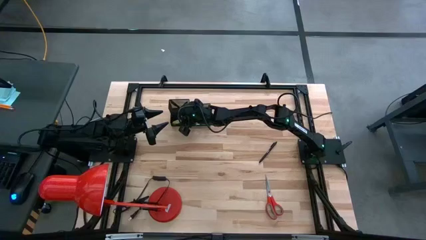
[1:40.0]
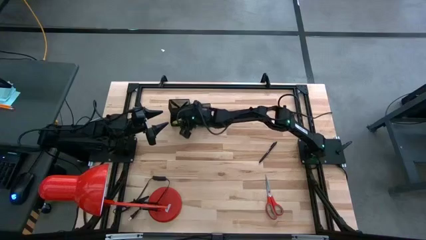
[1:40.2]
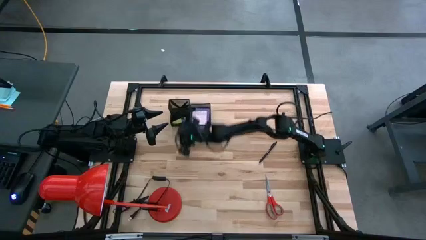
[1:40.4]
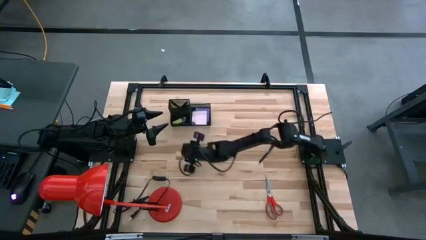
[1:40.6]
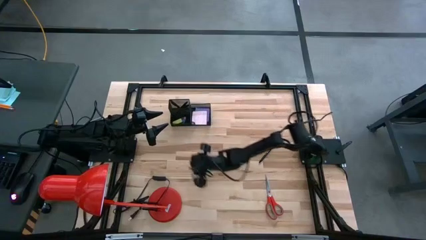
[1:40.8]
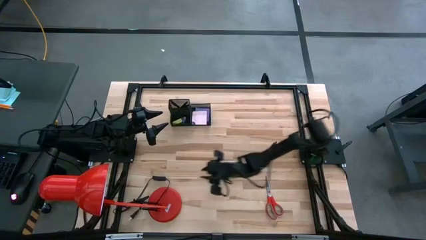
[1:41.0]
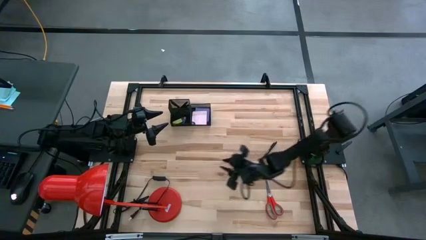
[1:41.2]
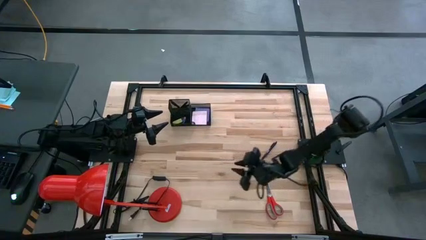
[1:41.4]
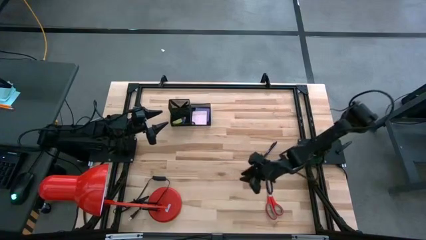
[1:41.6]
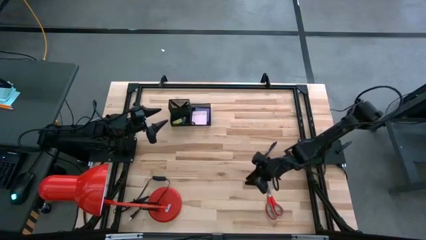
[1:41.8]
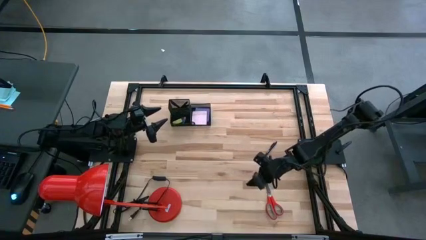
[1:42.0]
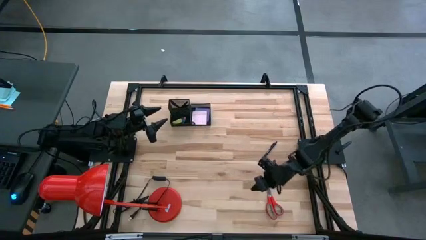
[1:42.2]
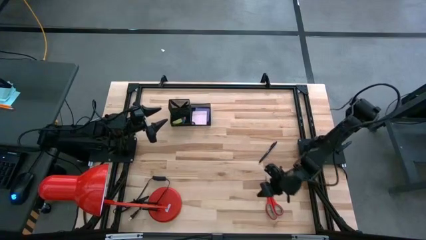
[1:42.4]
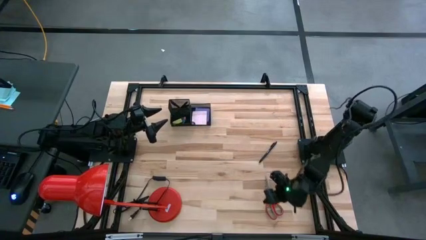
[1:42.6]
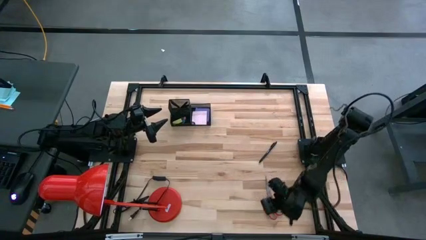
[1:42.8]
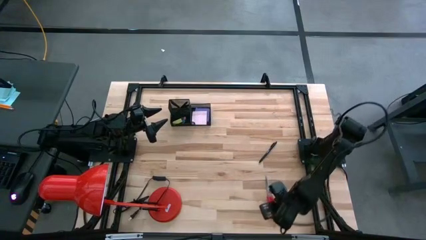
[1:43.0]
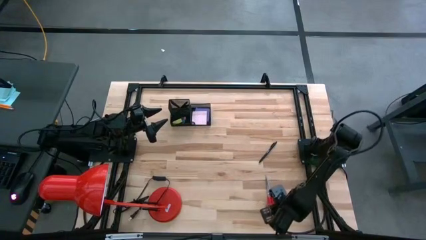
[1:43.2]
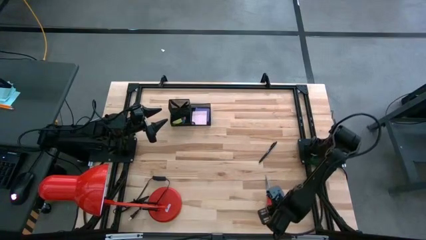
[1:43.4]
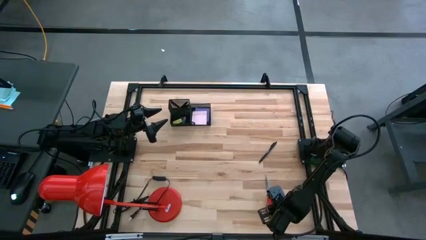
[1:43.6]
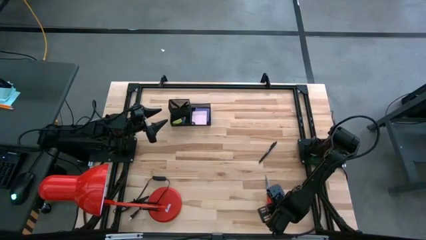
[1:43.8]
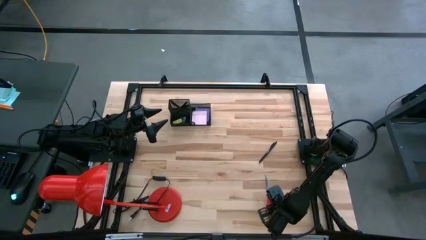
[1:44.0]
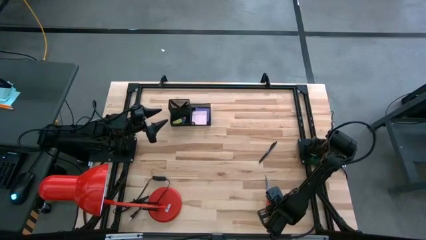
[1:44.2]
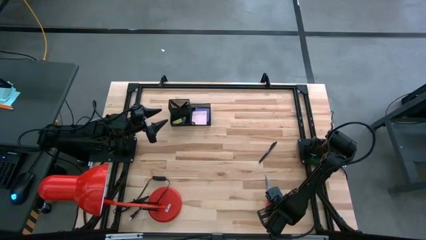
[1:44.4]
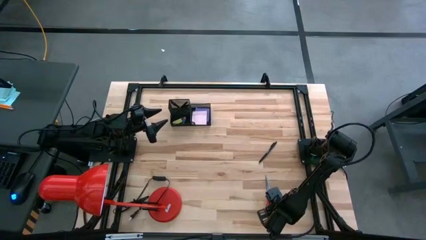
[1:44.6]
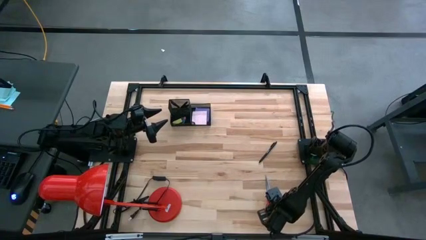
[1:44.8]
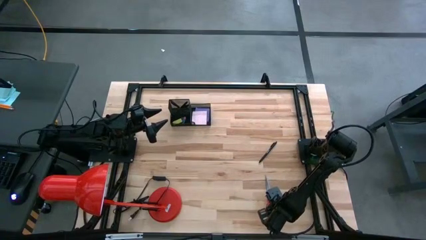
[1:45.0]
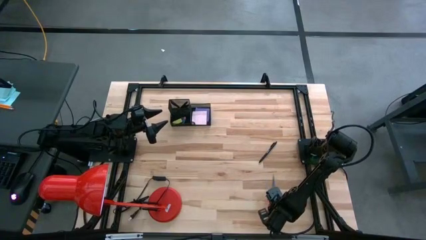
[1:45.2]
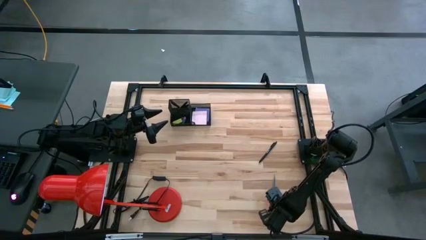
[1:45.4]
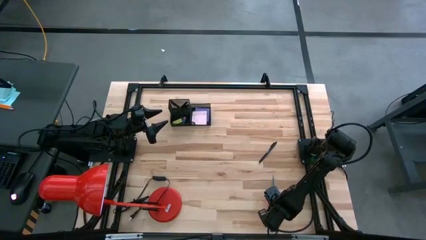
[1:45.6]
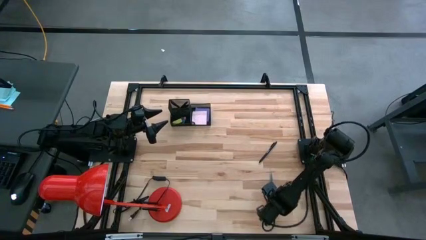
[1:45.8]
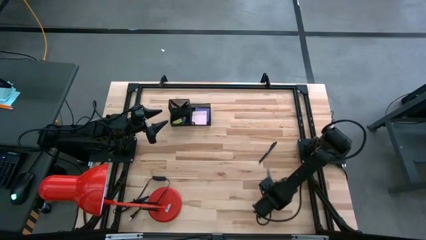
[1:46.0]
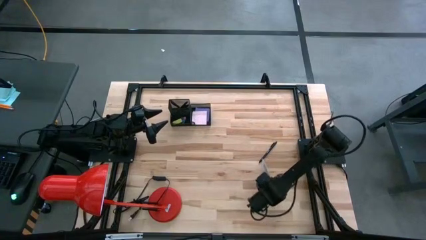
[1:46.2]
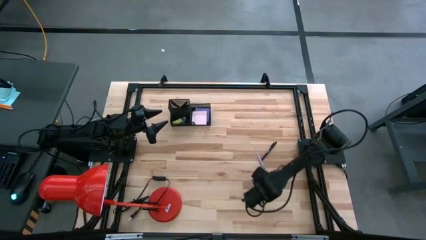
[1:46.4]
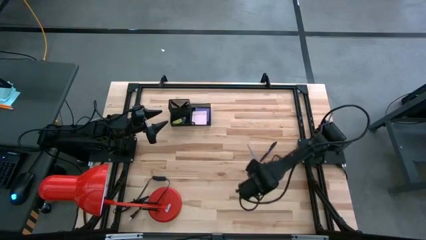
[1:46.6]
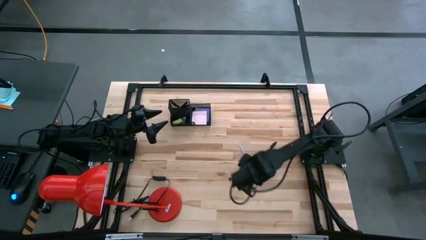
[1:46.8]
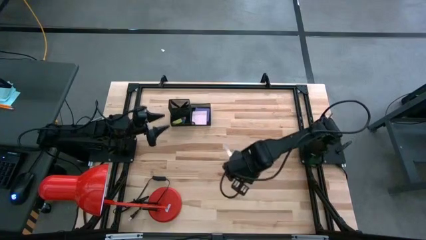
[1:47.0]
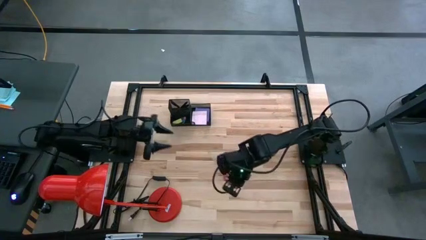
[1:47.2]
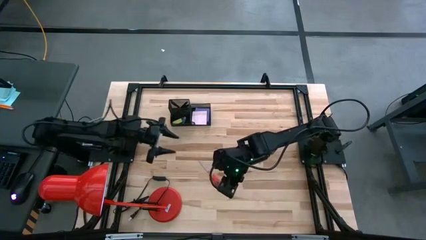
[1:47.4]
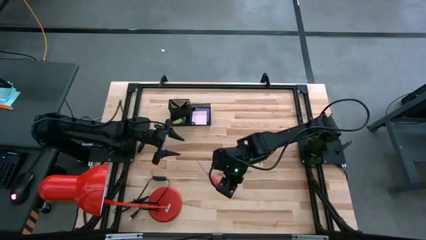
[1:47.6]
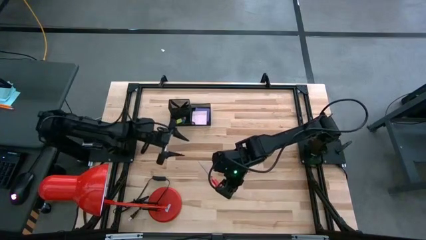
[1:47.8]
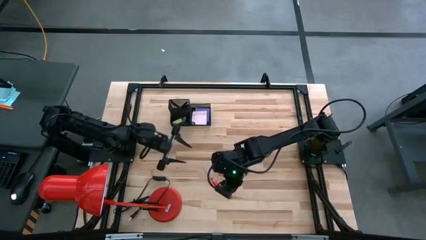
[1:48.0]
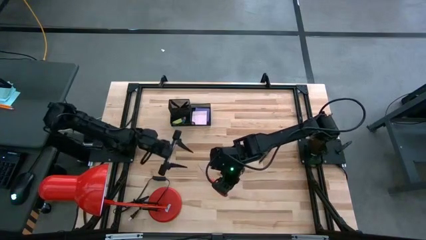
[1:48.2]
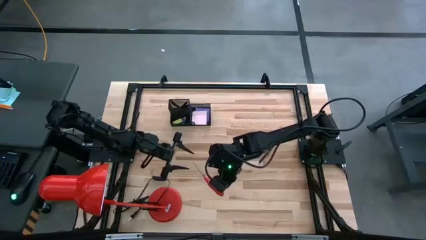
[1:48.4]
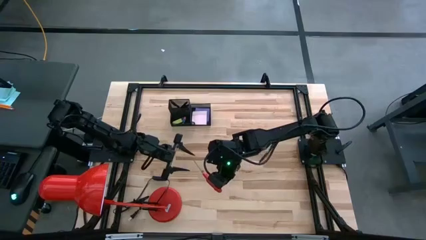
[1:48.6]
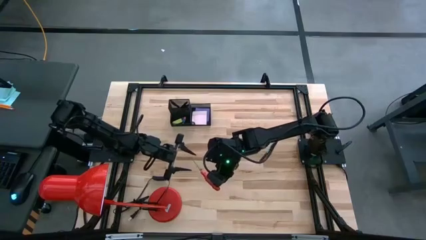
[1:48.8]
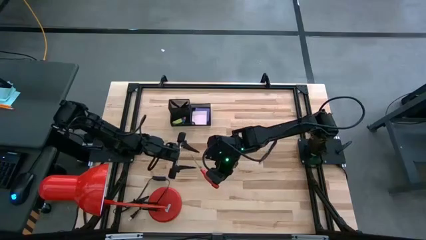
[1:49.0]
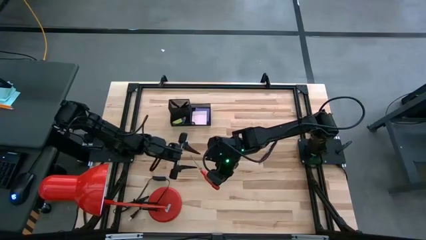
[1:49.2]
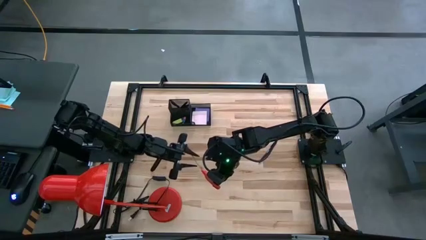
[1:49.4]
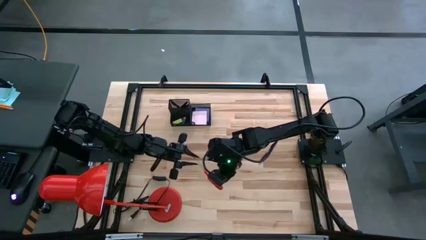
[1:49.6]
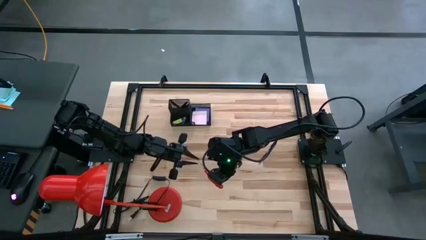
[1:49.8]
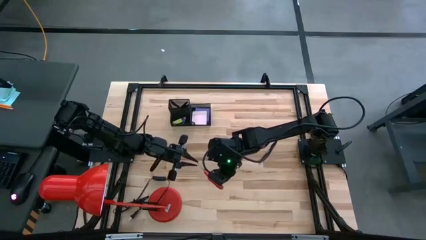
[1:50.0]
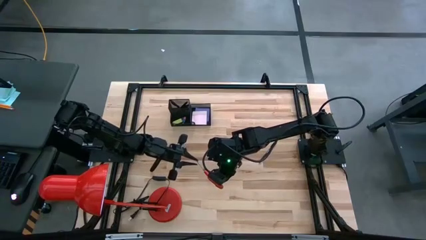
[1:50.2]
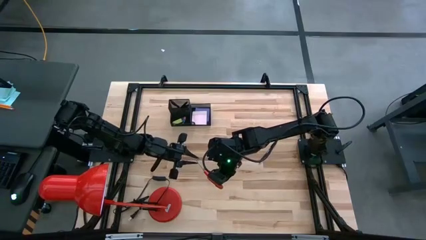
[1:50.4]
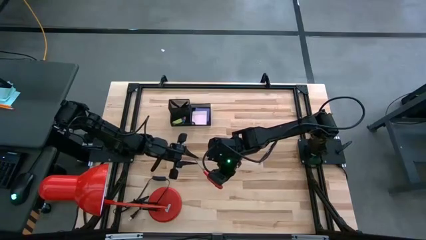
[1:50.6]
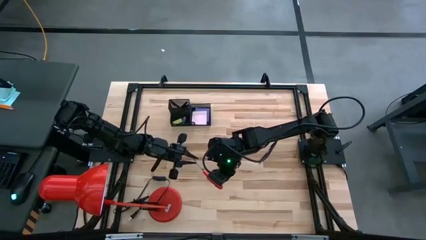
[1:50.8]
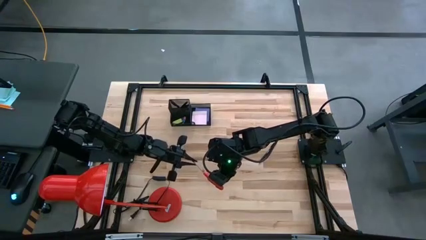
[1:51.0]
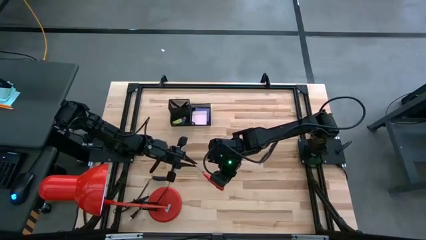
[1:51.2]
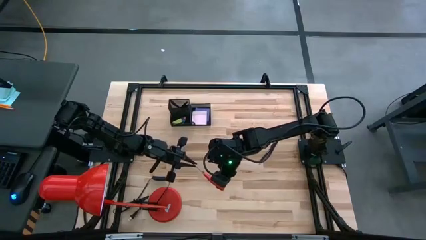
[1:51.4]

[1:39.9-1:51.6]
Task: Pick and place office supplies into organizer
Put the red scissors into the desk organizer

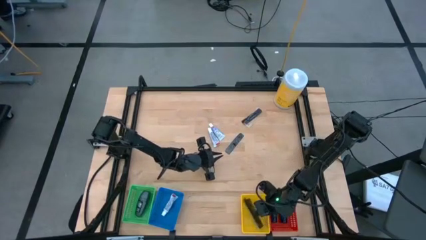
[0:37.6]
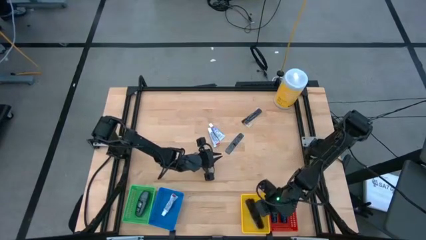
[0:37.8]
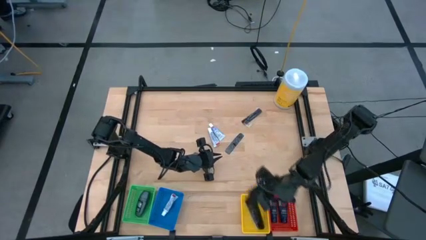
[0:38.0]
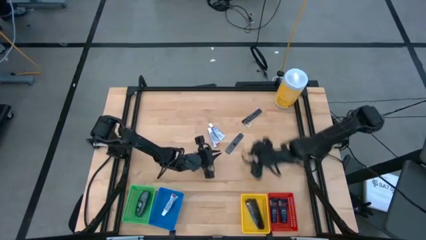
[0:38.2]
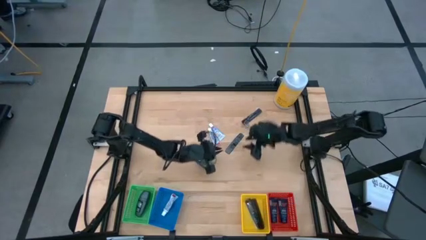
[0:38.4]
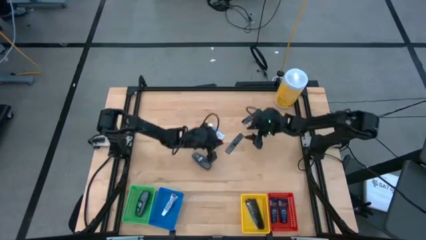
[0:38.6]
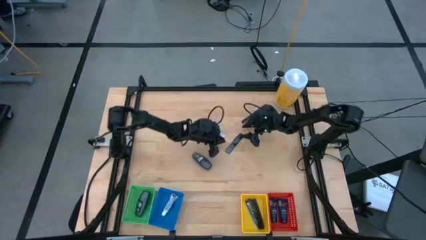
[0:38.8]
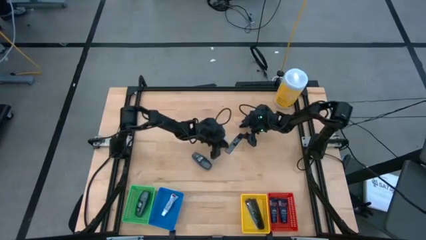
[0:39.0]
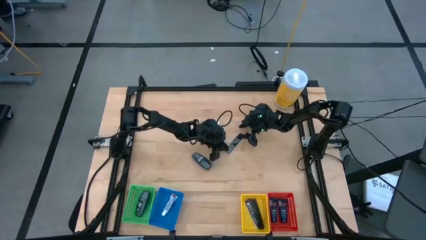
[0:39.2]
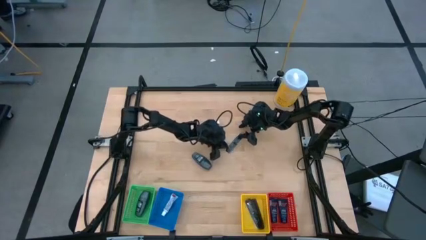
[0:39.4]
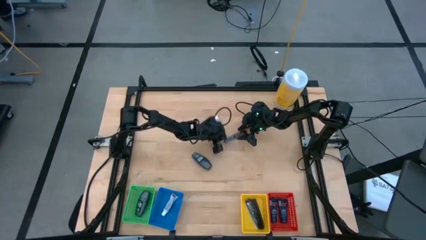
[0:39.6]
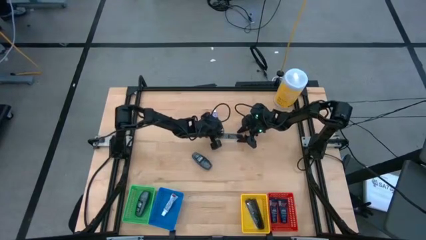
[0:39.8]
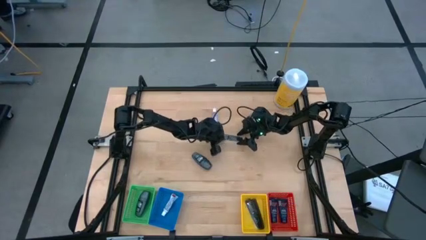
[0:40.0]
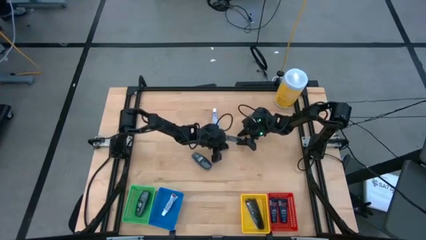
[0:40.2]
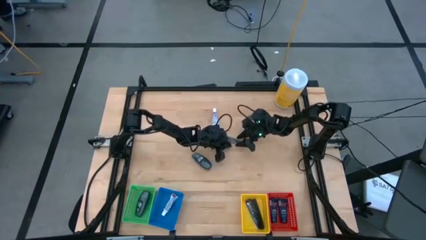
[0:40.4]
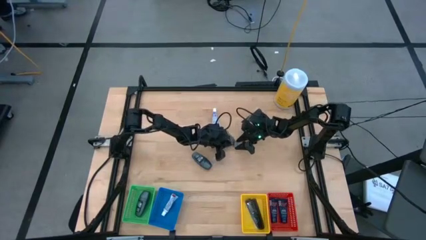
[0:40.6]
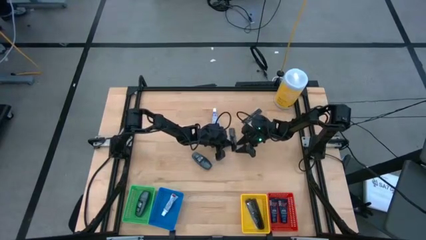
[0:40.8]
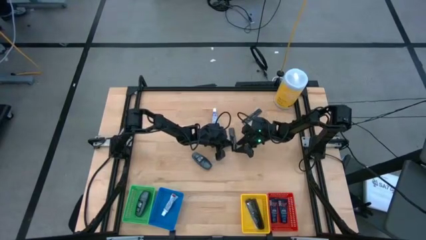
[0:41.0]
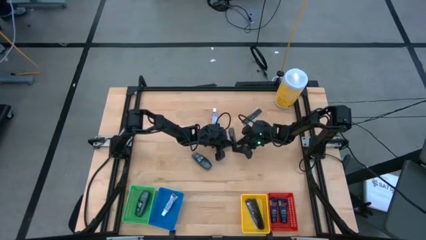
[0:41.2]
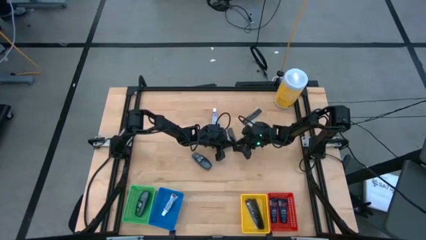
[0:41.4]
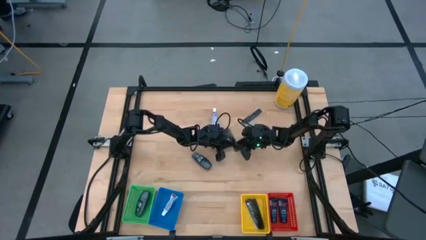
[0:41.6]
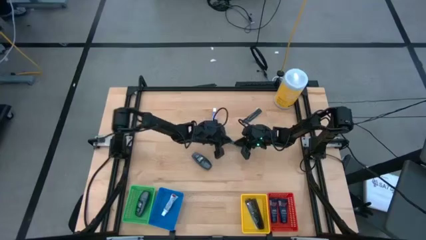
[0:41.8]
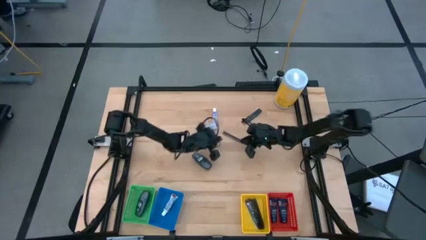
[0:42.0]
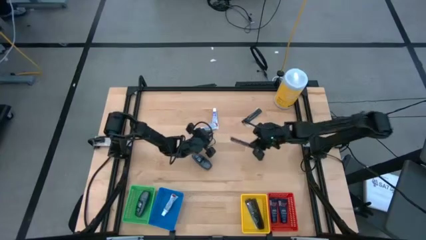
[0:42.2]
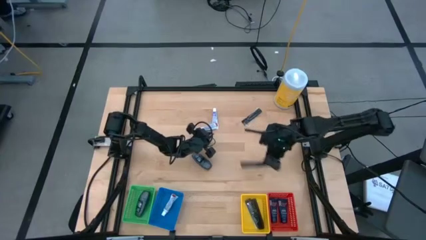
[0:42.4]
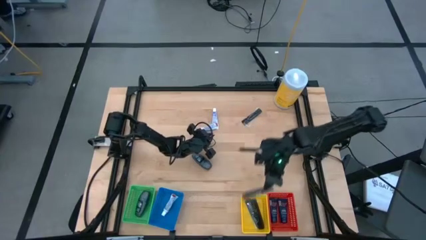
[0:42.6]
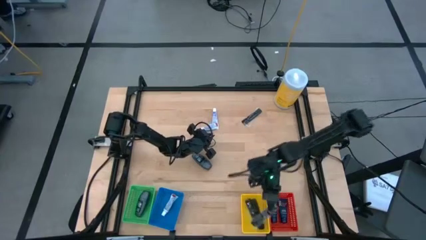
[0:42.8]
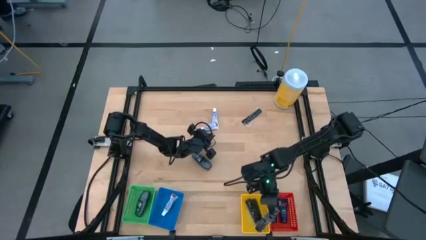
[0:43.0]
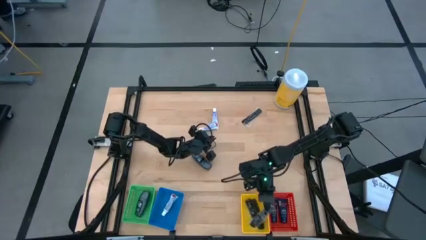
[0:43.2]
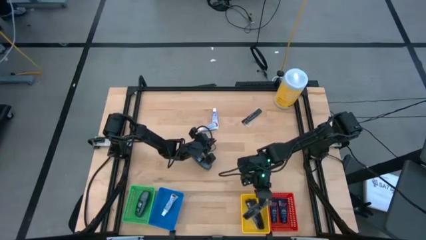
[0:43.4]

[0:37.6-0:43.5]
Task: Pick & Place Travel size toiletries
Put the black comb into the yellow bin
